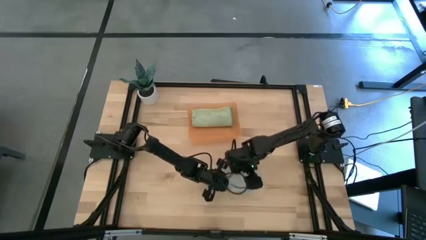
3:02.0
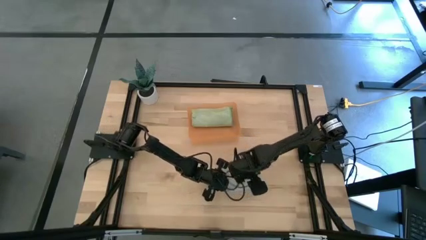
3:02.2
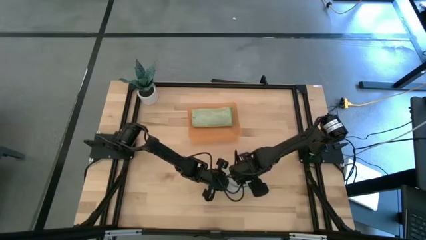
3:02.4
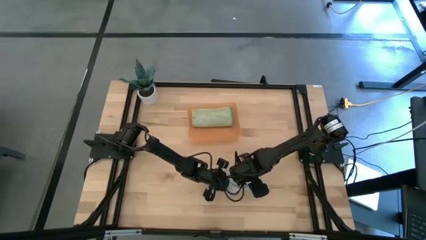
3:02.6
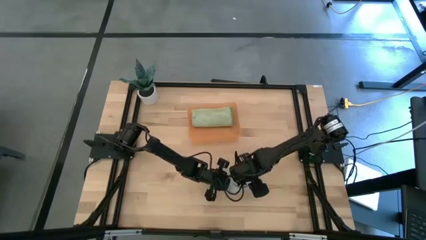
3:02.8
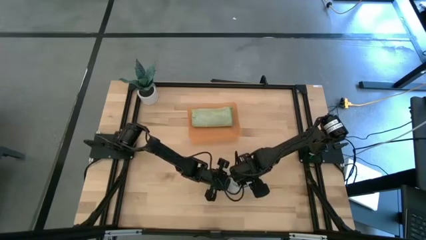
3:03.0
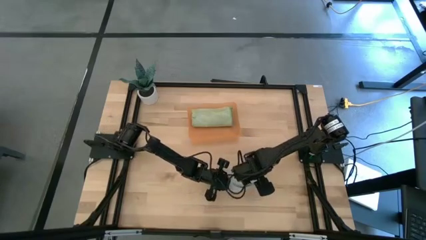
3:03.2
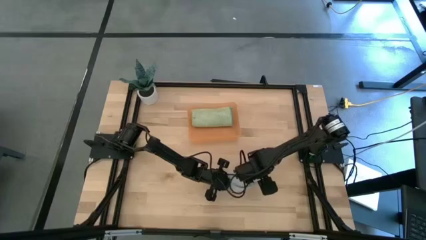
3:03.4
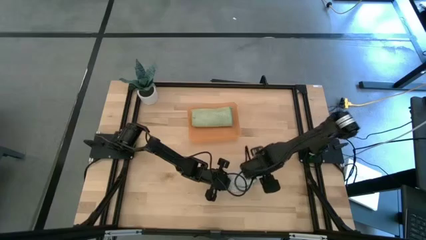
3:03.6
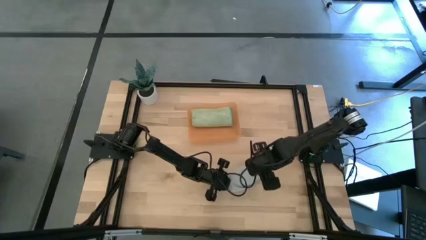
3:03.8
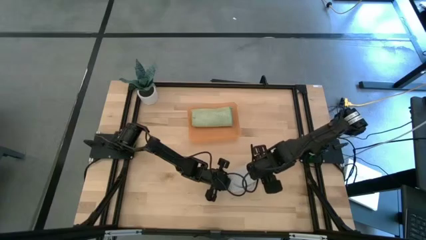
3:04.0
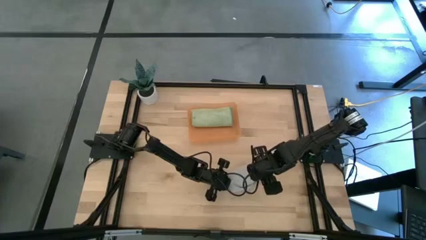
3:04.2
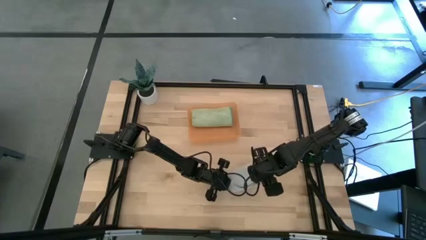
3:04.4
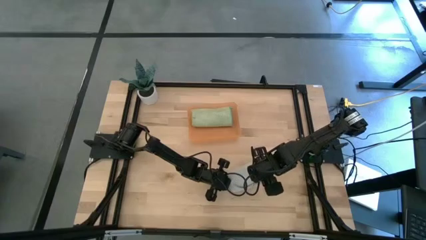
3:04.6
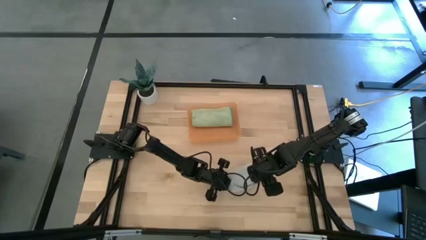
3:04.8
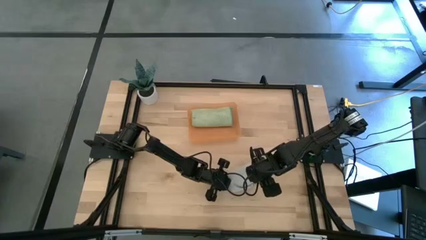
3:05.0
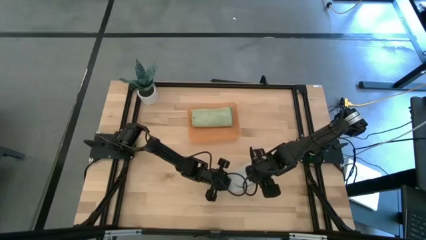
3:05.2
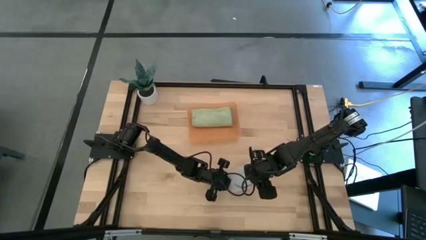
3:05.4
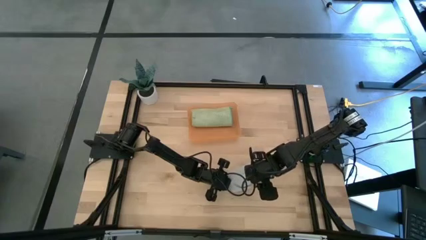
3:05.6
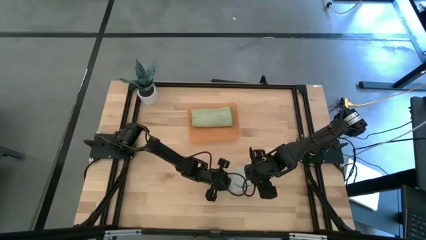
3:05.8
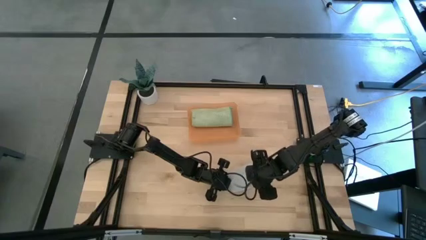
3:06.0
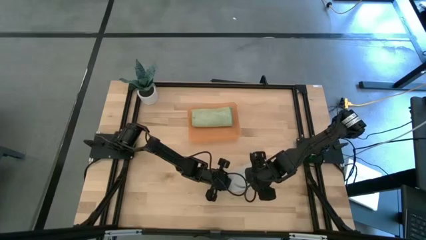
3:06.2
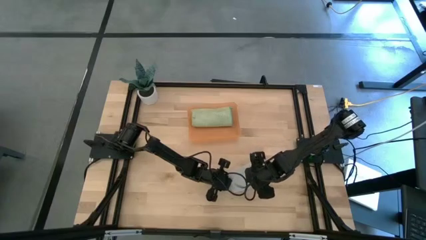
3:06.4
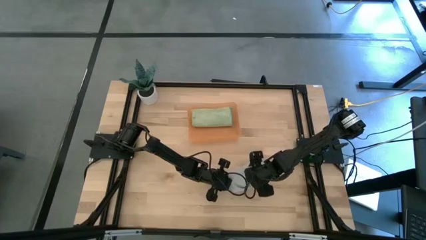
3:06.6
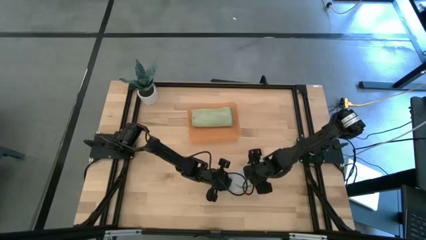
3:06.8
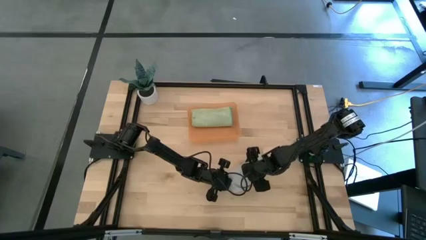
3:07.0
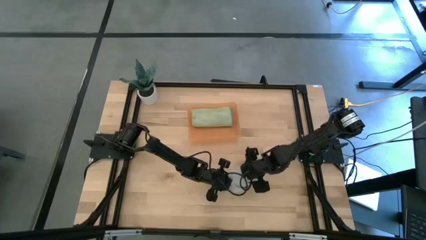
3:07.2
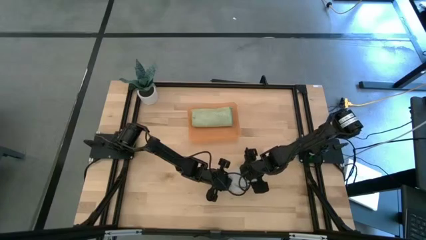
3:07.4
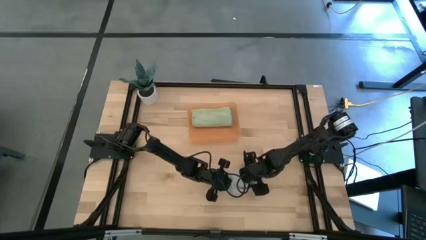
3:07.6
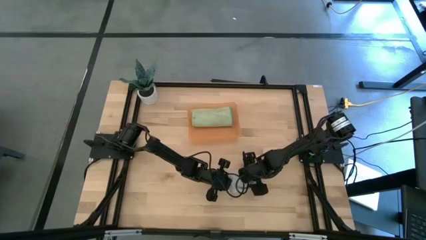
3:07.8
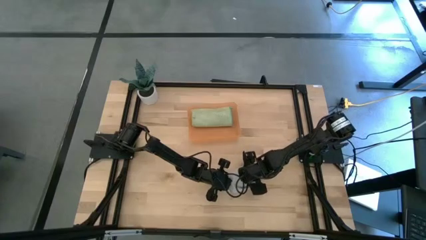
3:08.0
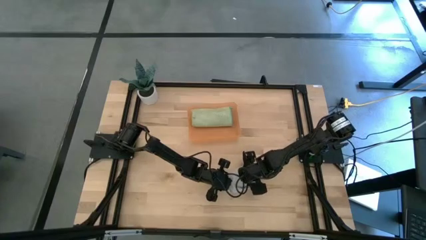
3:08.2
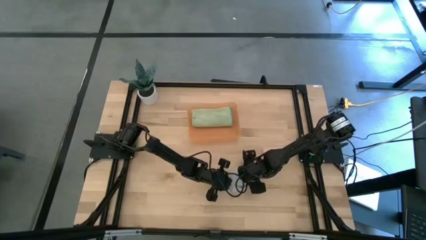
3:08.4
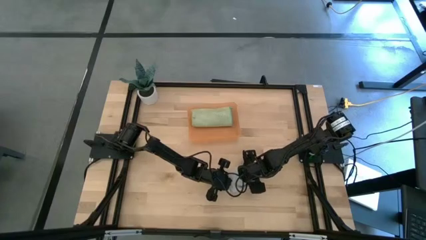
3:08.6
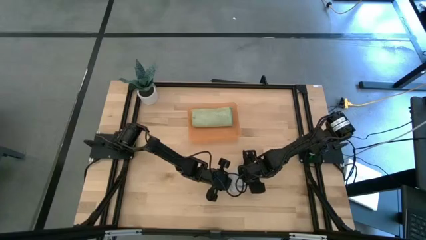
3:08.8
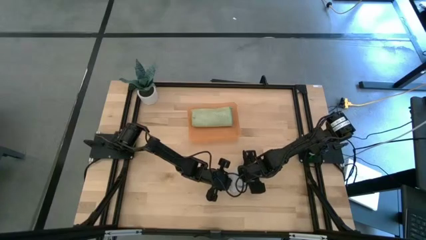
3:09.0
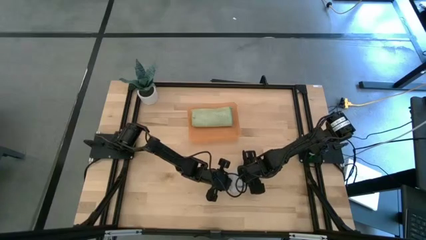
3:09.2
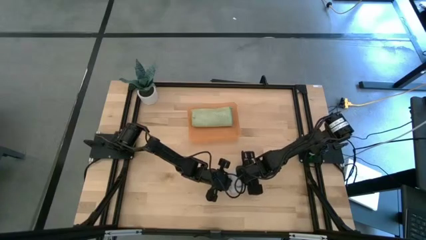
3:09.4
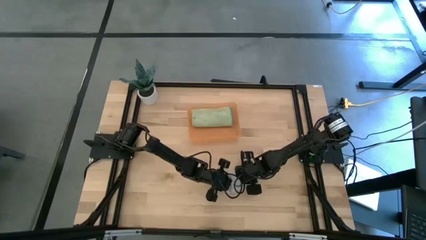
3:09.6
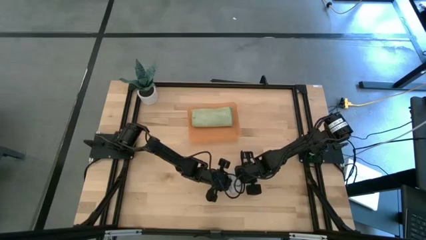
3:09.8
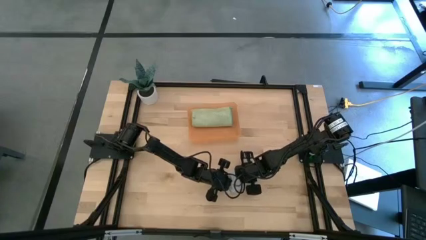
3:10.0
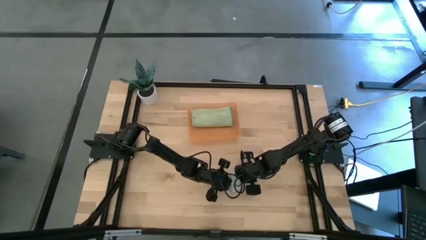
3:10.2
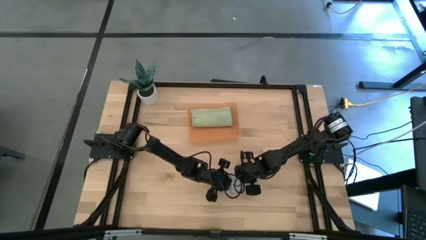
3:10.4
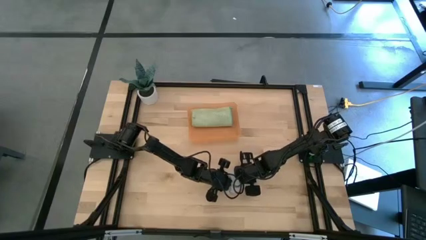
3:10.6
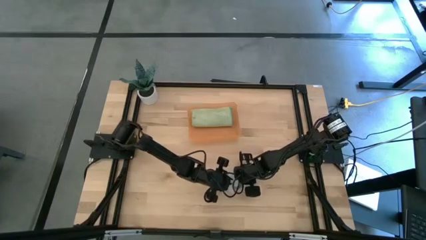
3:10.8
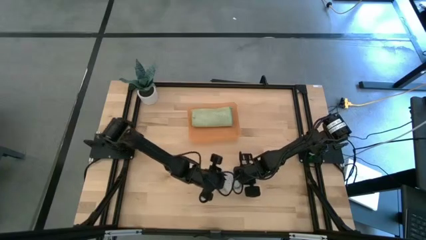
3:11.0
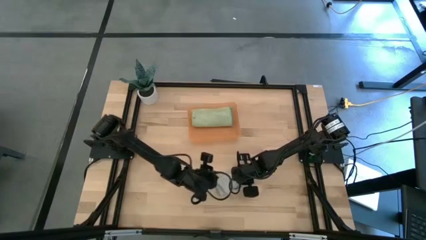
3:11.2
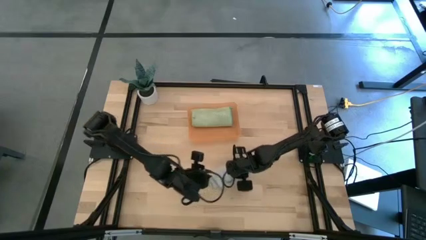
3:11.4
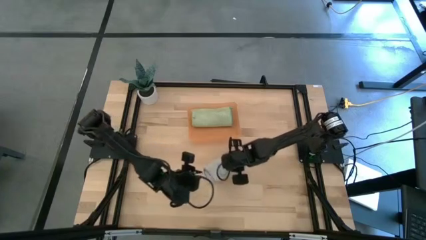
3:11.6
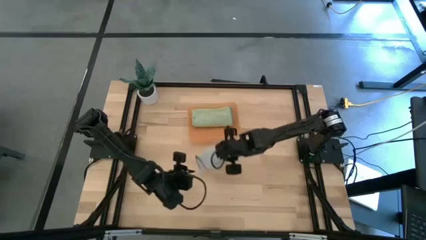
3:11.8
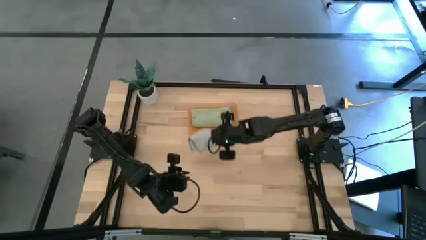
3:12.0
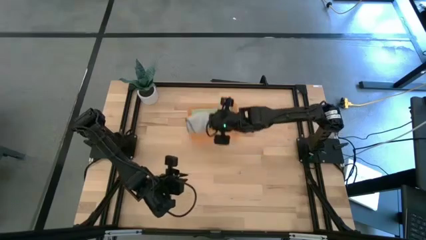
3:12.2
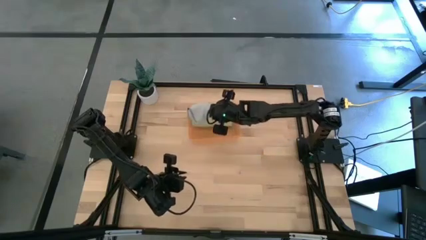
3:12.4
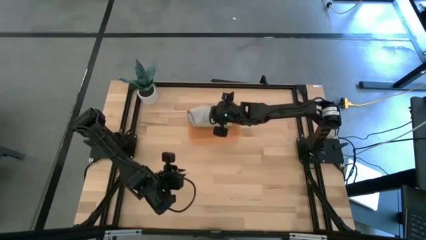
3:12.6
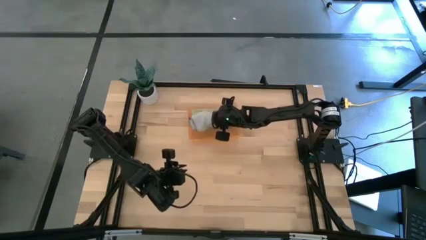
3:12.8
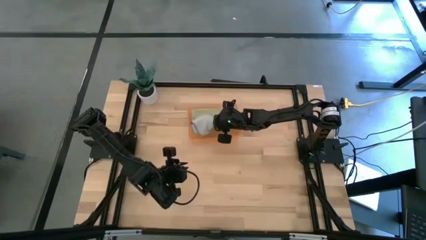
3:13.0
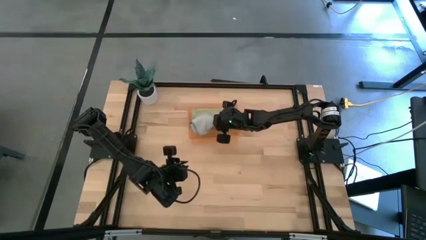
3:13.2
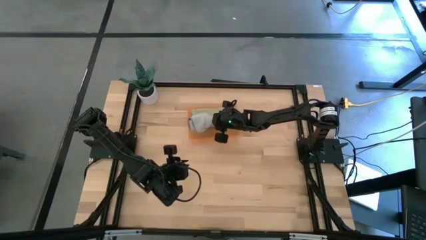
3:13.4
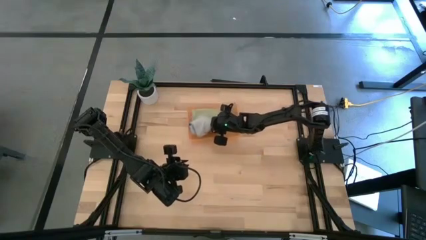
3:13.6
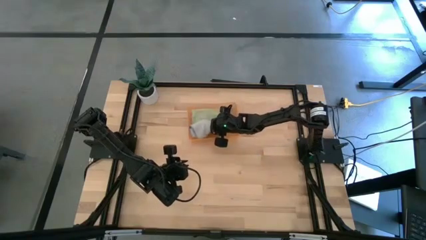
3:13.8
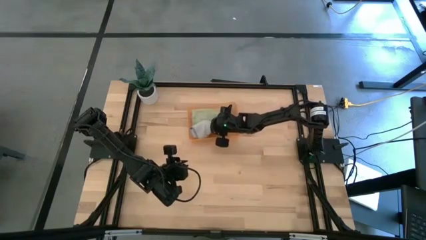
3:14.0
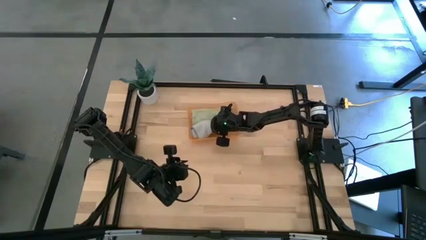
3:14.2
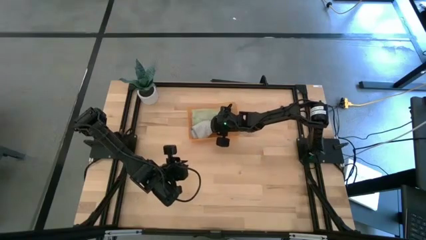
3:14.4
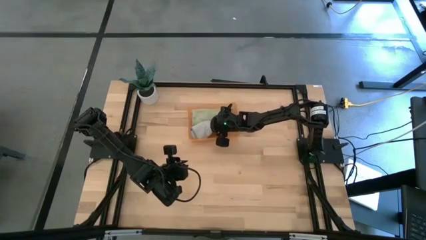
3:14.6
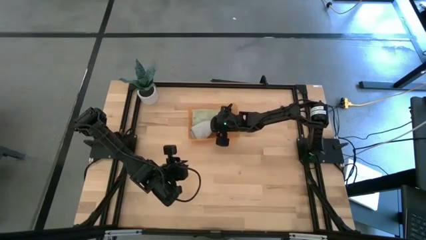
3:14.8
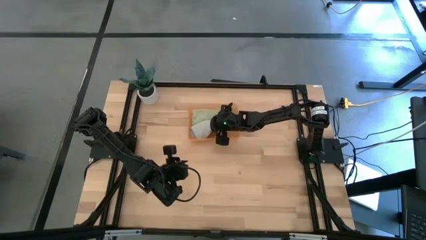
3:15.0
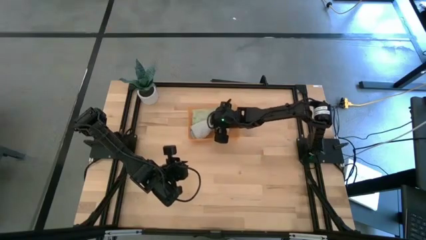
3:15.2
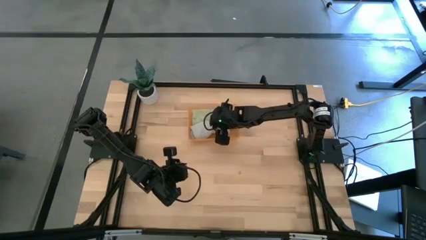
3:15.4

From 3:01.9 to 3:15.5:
Task: Roll microfiber towels into tight, uniform cylinder then place into a basket
Put the gray microfiber towel into the orange bin
